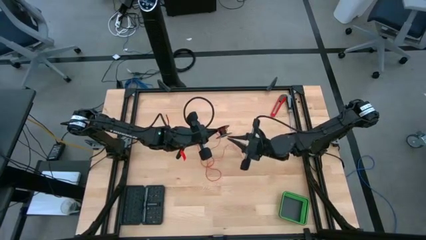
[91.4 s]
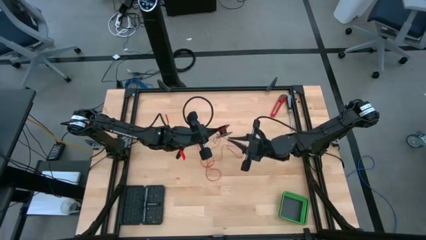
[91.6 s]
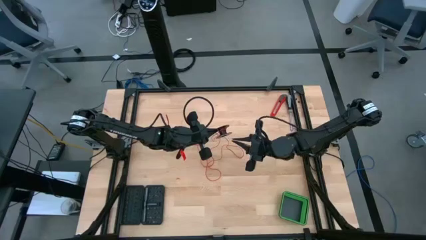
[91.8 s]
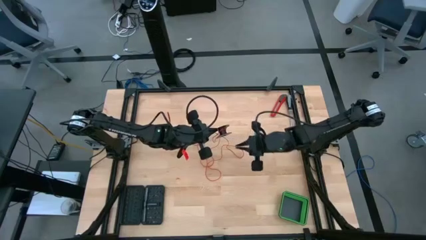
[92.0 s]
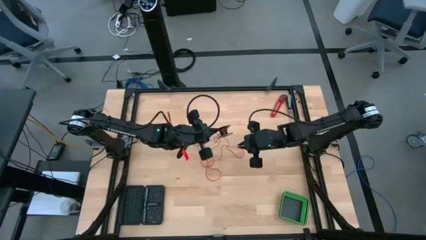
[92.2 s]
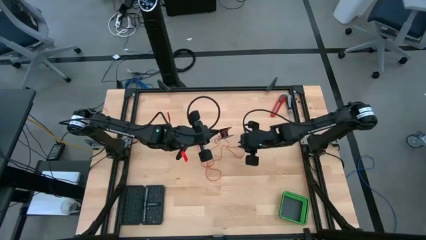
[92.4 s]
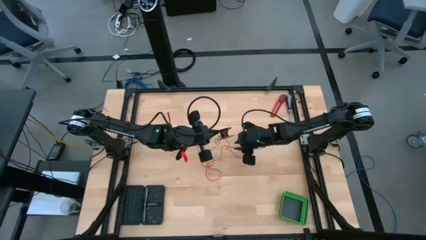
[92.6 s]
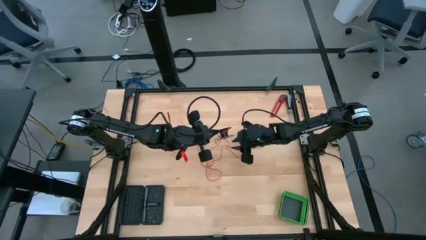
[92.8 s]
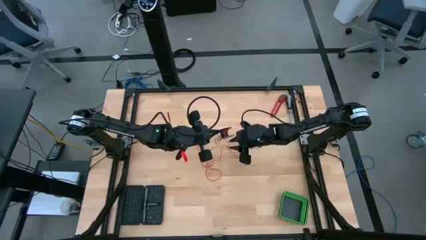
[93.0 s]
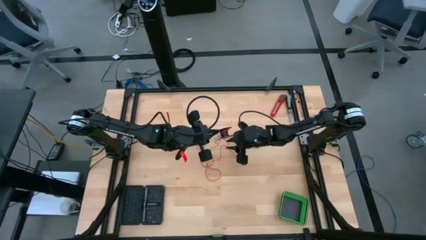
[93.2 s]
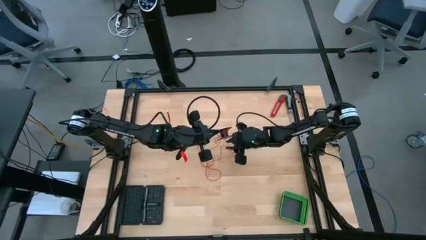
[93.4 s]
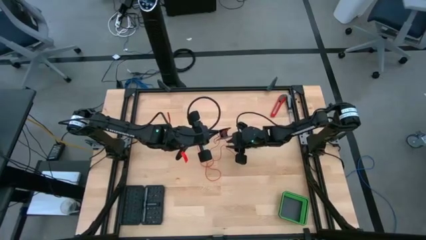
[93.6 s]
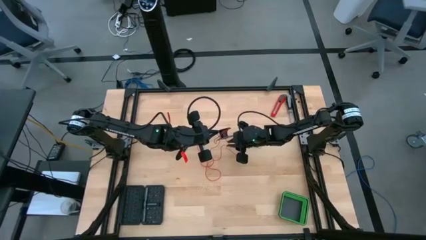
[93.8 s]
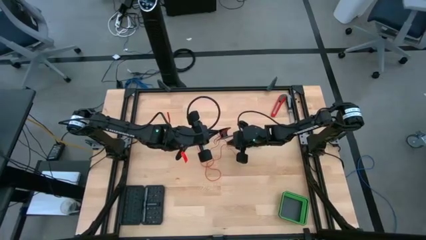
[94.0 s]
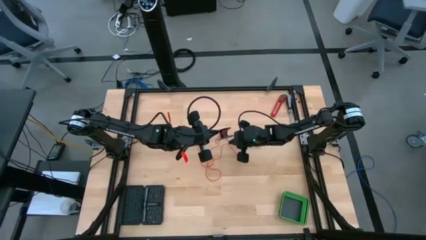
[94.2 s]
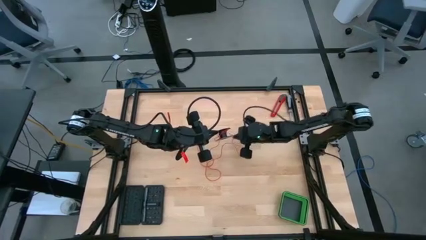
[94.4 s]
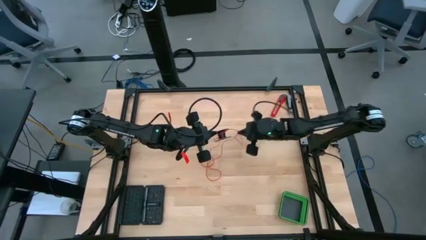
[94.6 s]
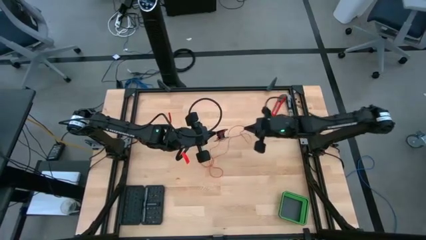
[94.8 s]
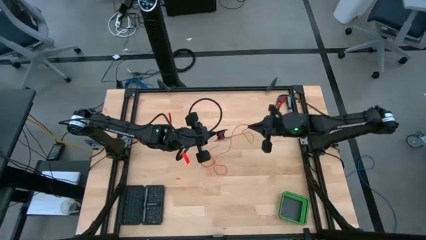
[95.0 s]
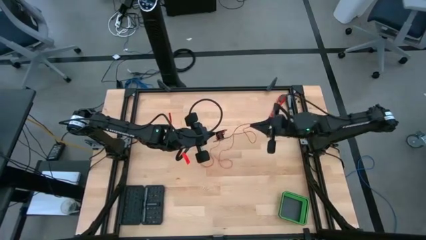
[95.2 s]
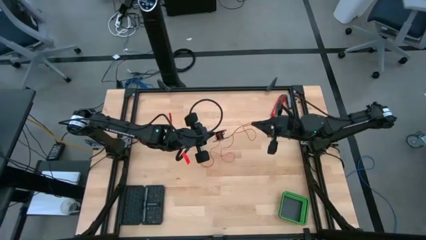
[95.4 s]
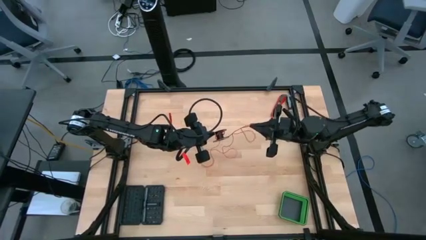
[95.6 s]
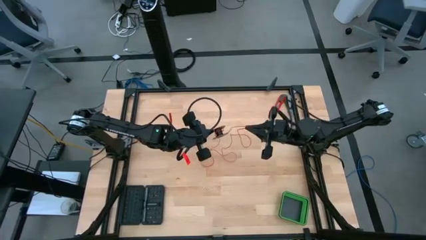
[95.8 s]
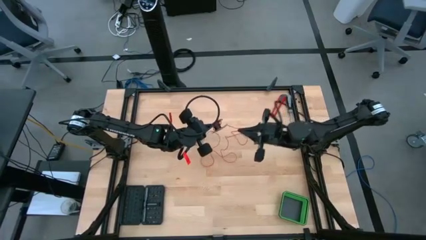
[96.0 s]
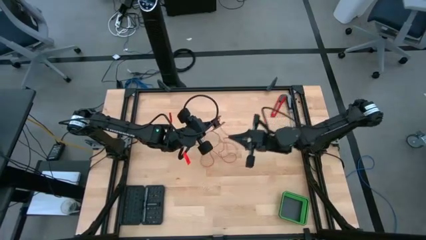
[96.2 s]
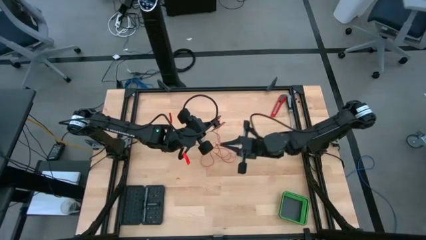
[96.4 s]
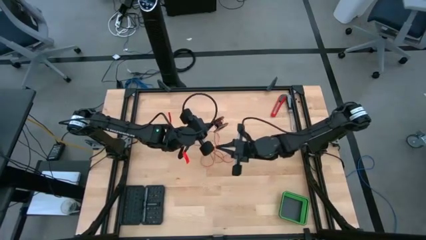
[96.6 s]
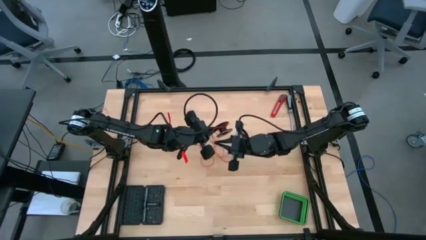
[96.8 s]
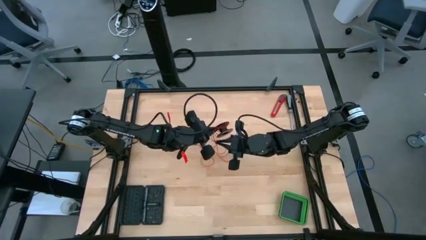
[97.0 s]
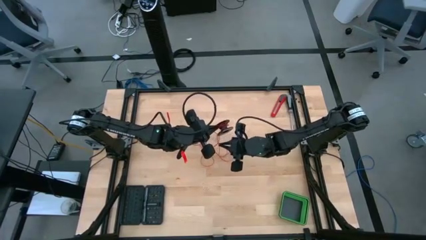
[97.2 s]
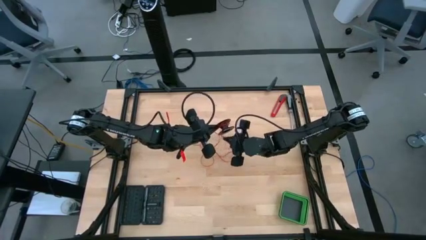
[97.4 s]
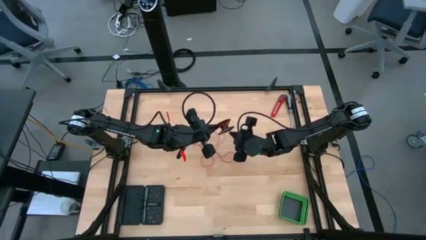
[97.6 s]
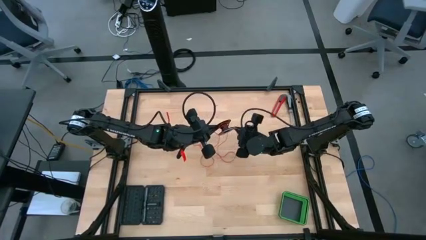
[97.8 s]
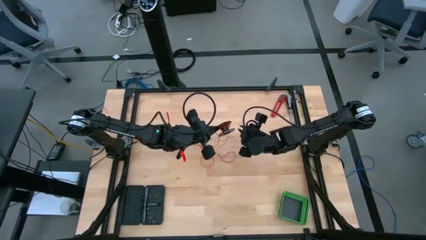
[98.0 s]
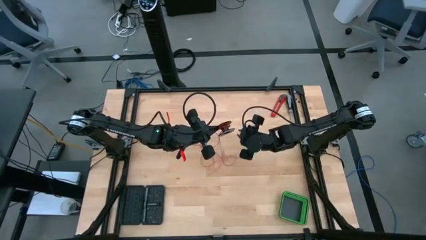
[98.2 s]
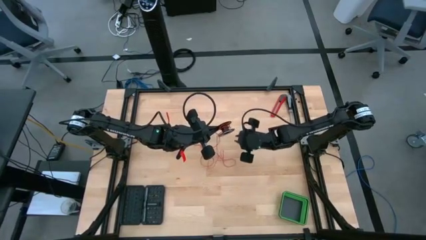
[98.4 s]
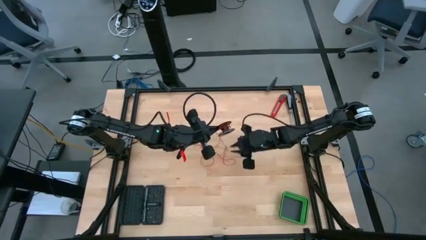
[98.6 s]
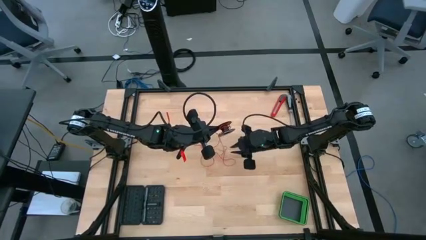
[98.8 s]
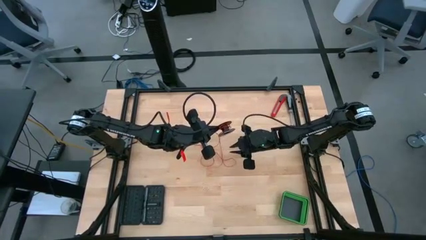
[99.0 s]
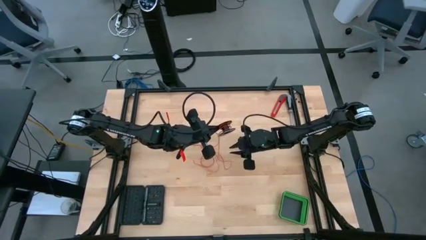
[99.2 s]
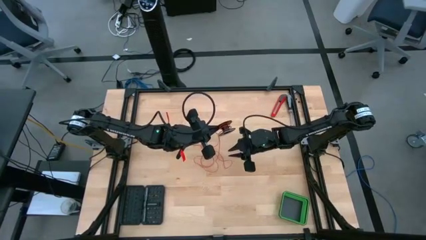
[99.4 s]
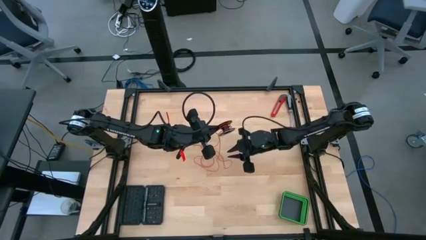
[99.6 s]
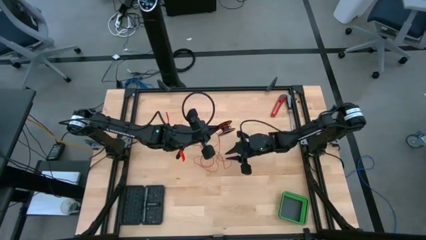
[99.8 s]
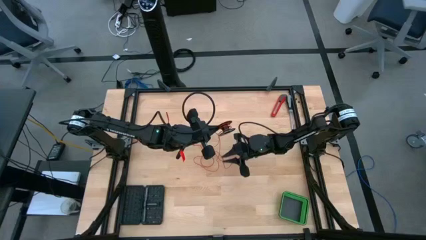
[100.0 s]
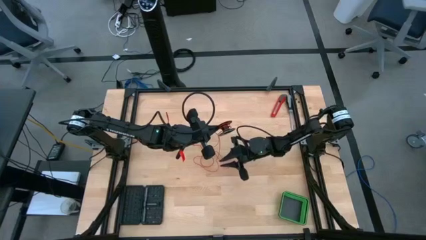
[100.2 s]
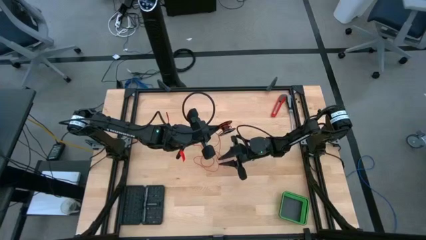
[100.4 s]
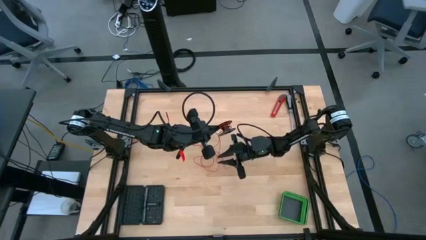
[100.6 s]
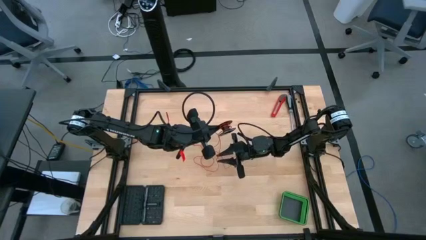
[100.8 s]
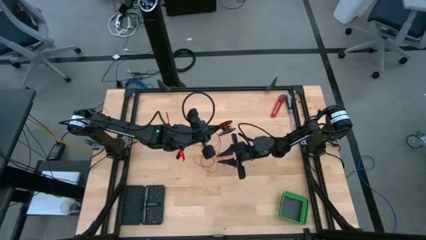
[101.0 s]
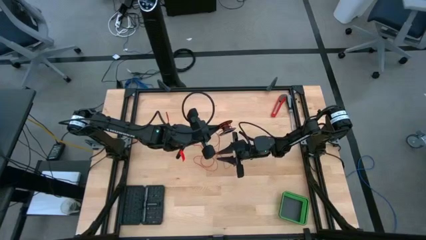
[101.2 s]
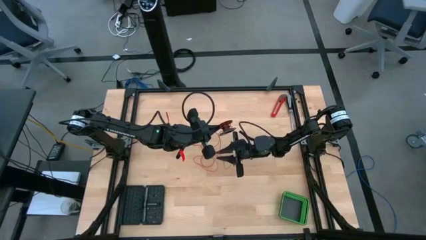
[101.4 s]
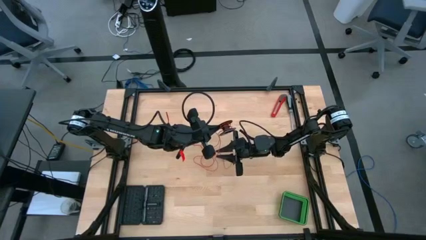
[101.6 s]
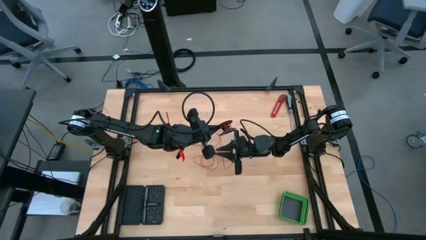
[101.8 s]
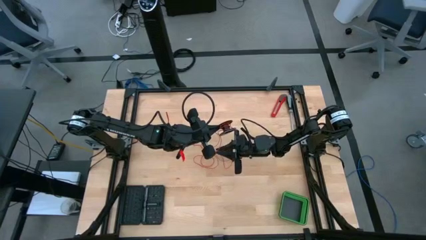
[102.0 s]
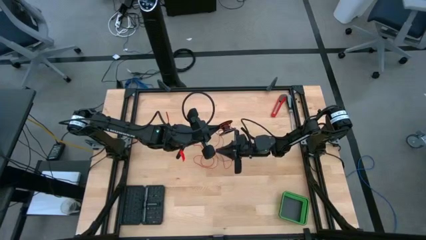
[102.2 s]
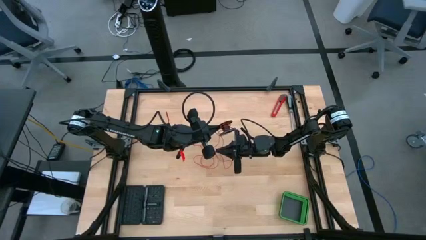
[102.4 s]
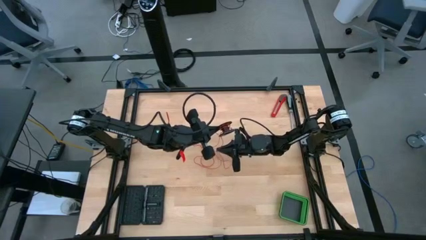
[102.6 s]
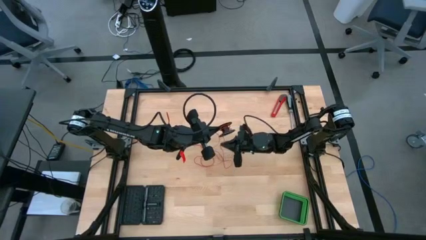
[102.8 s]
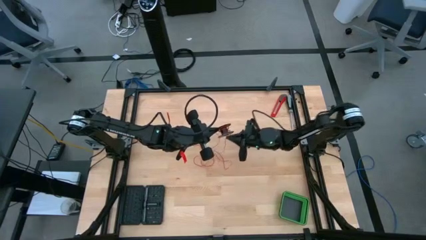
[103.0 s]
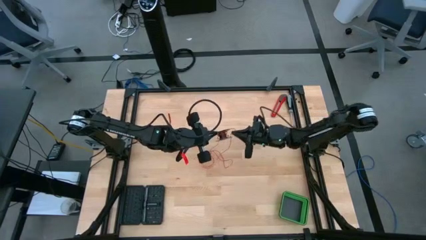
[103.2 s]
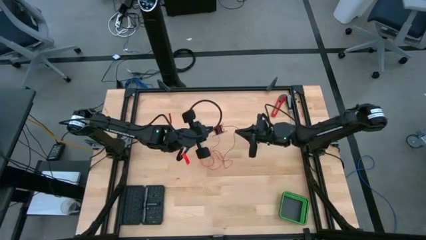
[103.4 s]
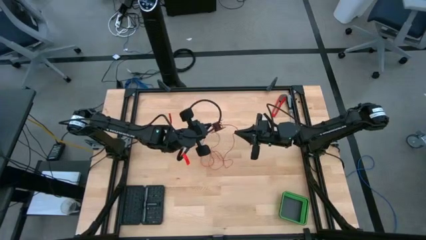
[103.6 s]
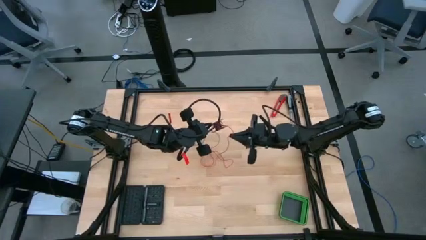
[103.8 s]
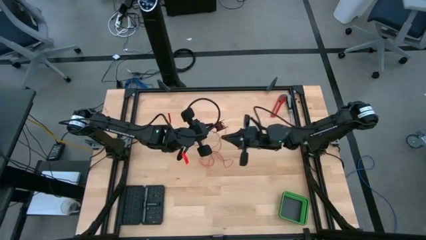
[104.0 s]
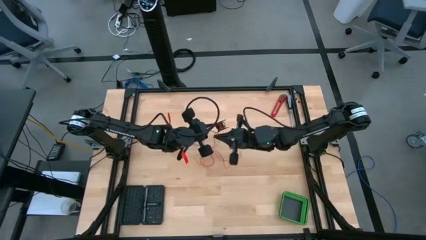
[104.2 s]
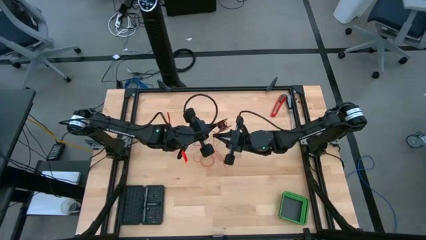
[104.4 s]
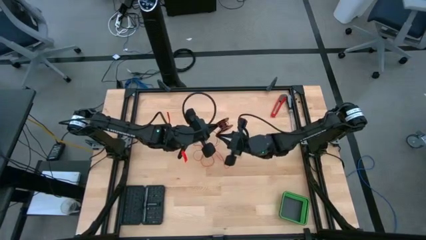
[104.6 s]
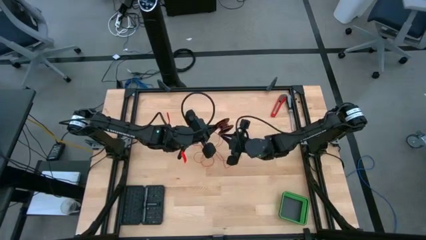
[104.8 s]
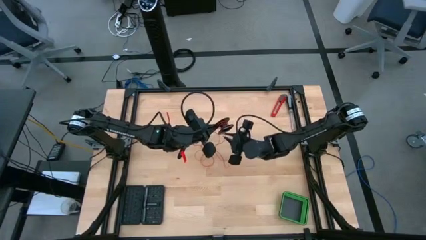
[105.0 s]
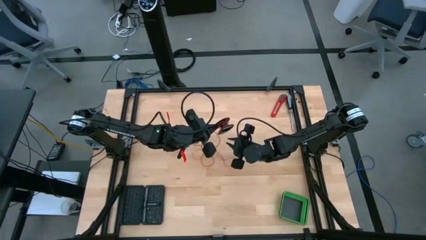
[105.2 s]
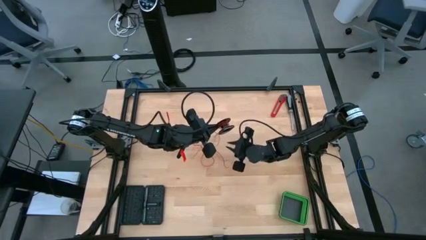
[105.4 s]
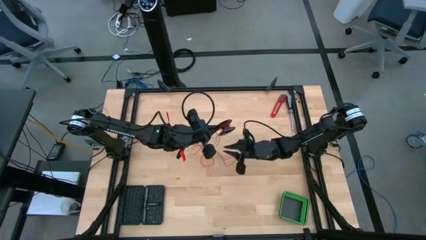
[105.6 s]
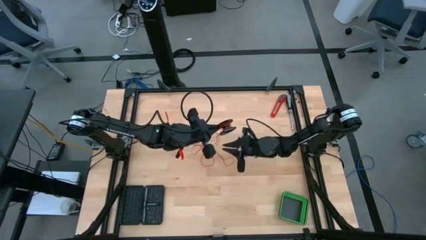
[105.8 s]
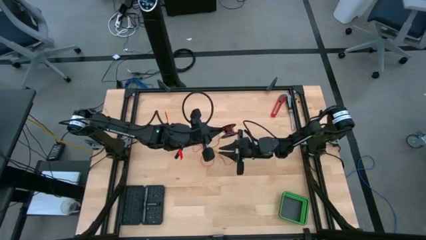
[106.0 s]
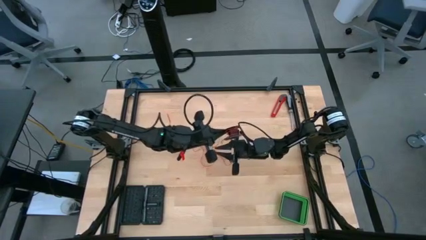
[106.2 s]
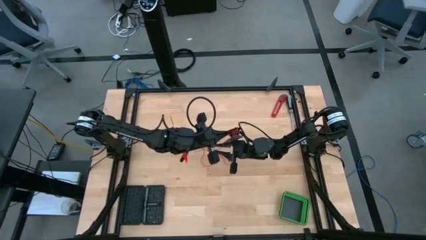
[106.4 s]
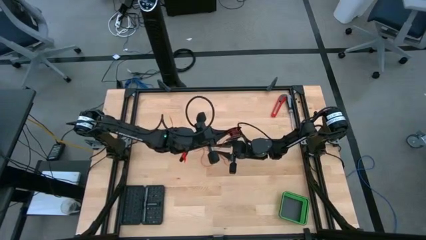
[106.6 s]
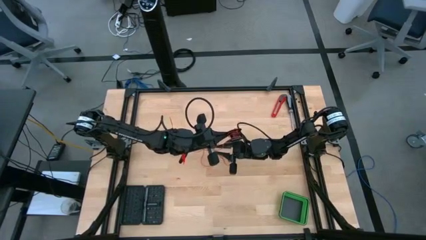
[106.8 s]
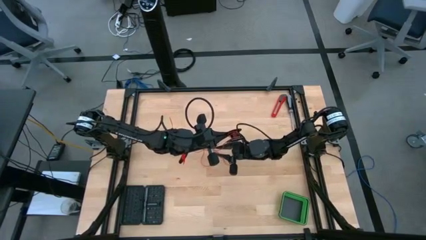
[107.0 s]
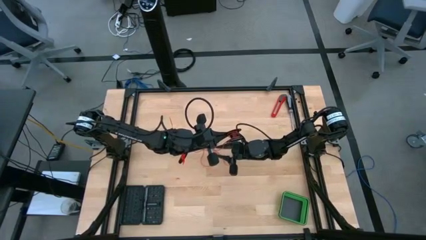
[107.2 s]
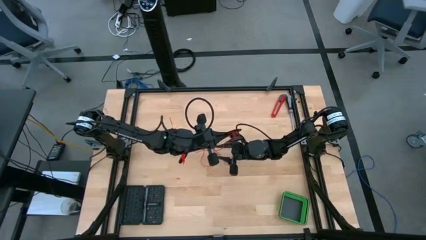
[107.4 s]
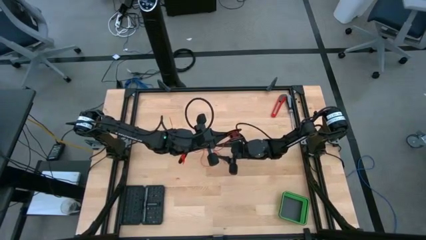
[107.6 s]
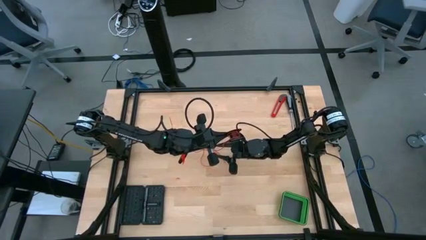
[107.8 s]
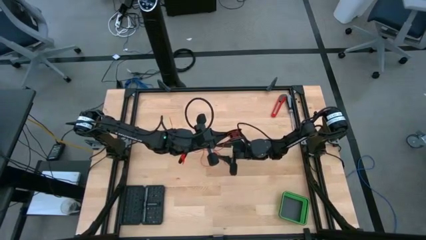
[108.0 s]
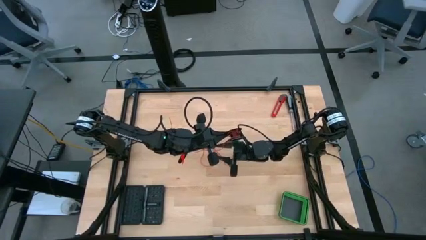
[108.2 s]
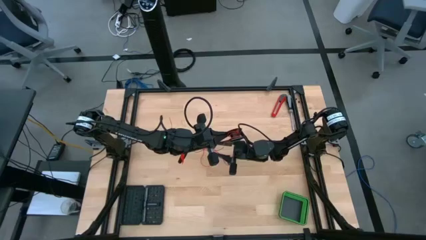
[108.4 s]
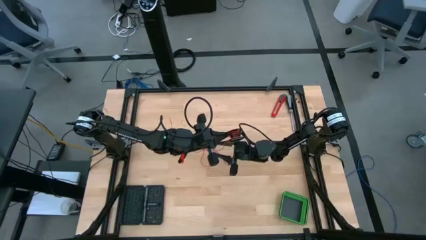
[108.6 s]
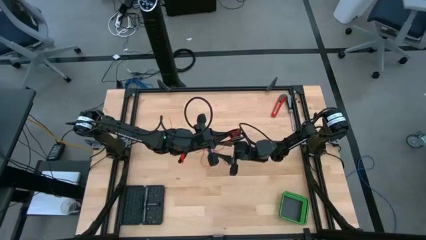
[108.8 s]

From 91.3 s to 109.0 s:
Task: Coil cords
Coil the red wire onto the black spool
